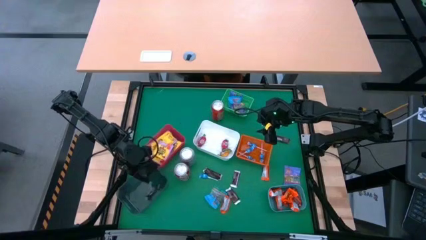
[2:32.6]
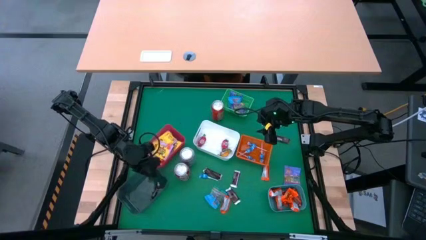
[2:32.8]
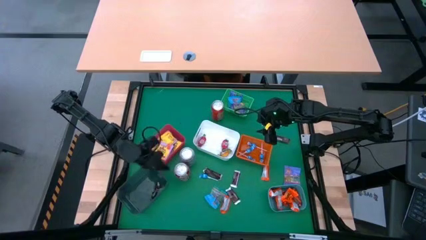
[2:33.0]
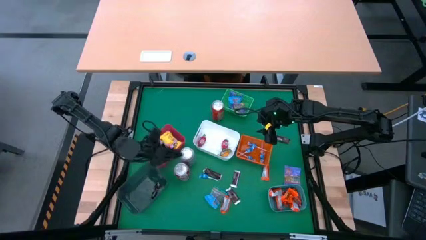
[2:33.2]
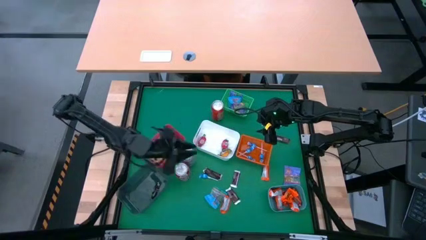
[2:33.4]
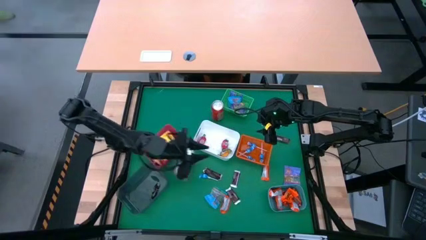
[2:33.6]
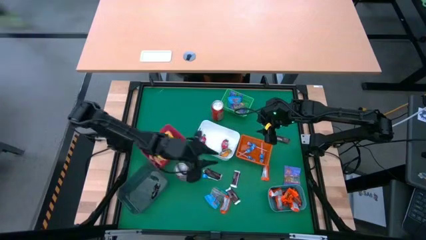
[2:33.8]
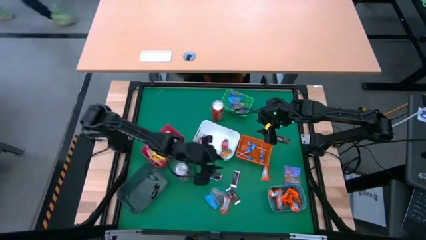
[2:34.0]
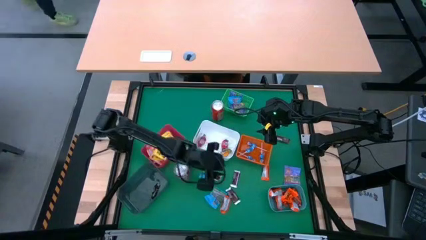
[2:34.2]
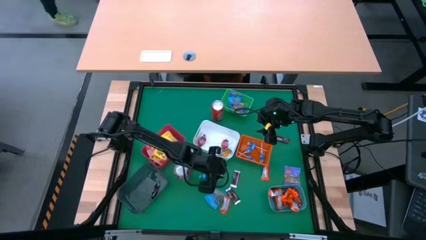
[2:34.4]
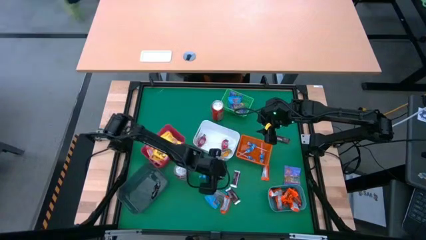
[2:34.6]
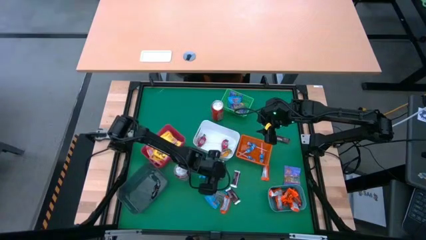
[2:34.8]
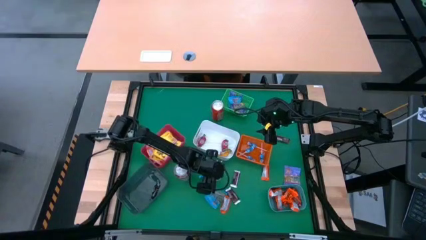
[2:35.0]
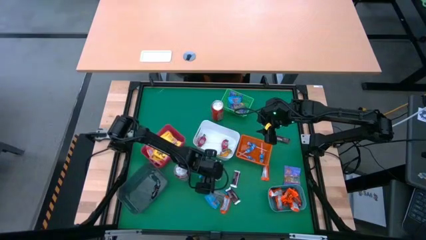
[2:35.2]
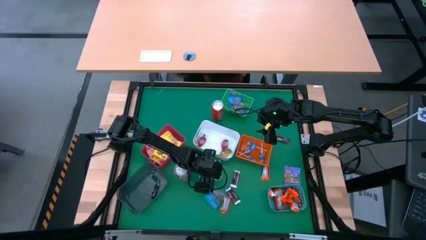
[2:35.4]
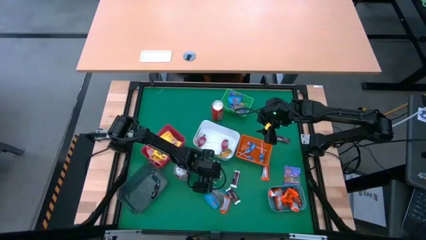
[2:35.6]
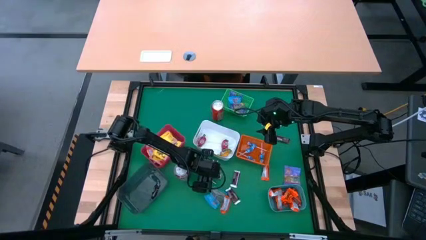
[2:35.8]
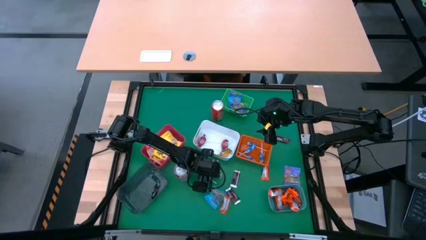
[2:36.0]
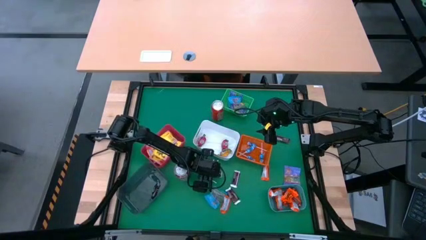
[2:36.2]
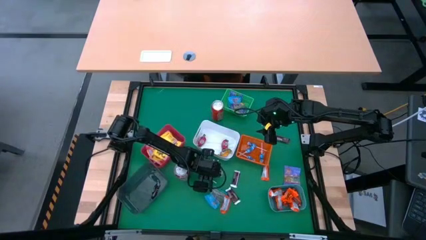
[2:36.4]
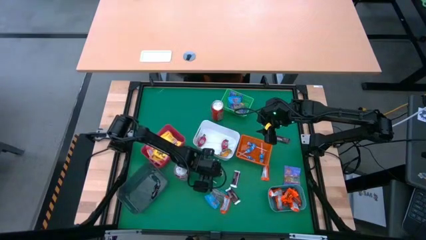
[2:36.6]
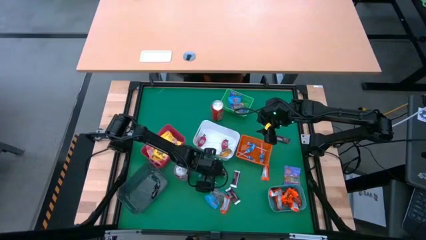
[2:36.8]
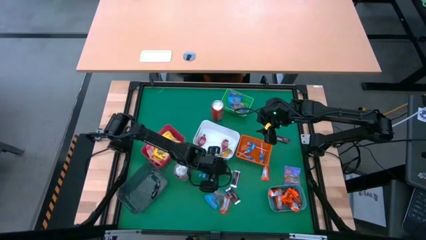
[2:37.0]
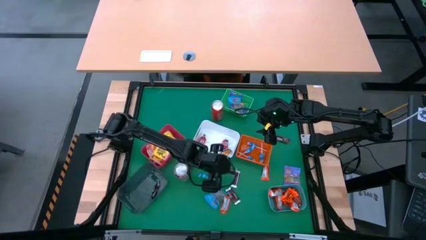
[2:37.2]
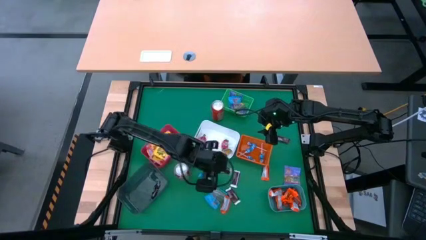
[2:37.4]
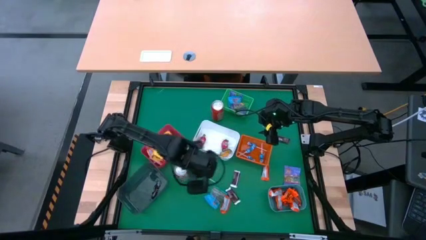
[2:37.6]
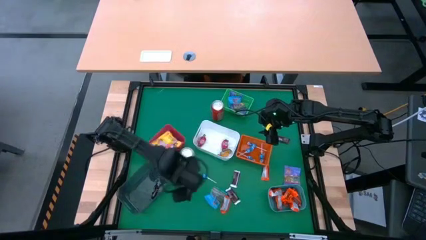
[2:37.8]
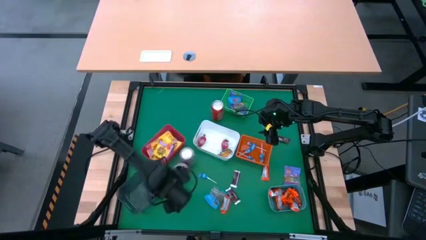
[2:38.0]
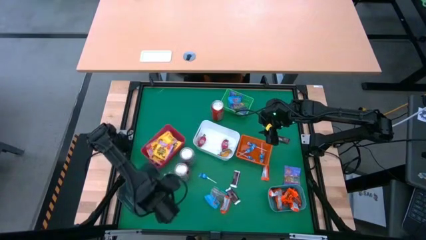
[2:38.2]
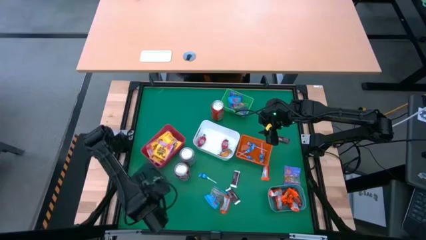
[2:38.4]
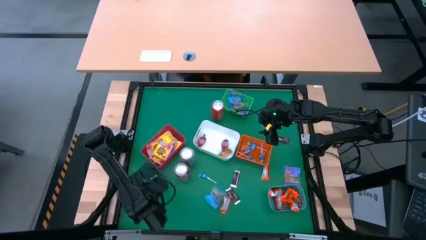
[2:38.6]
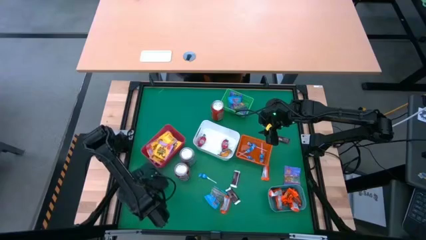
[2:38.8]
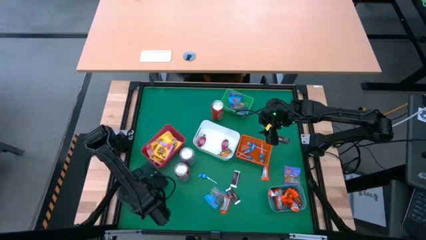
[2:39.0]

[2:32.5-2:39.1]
Task: Sort candy
Put the brown chocolate bar into the black bin

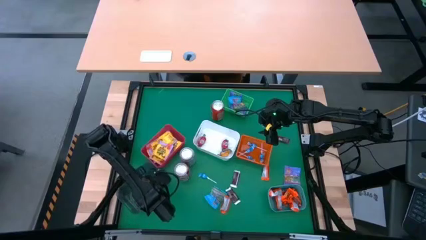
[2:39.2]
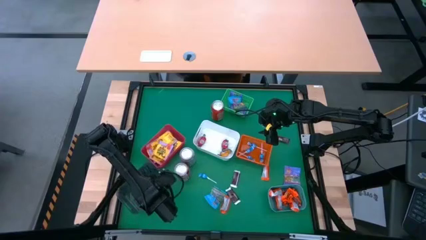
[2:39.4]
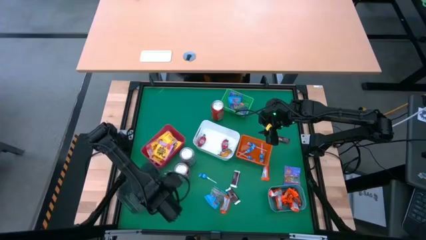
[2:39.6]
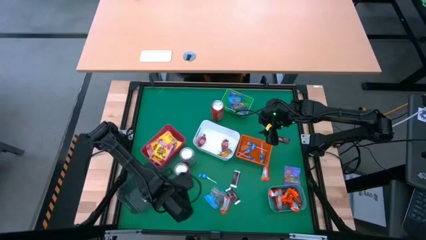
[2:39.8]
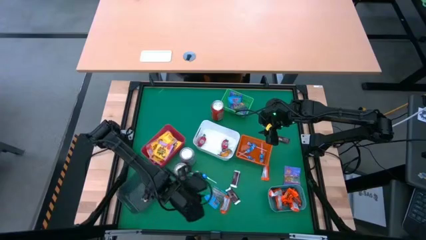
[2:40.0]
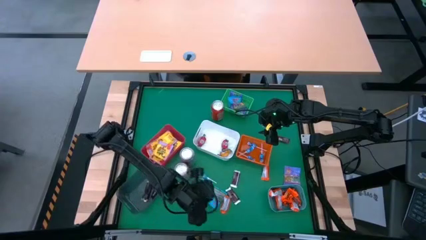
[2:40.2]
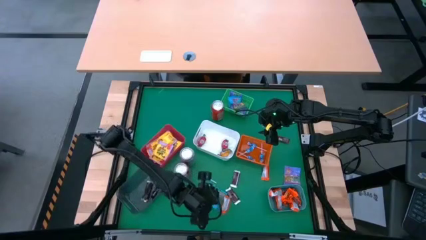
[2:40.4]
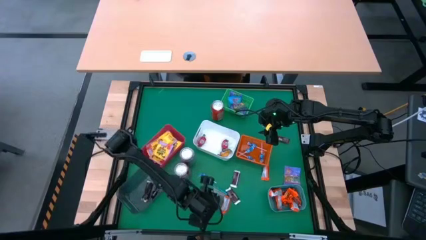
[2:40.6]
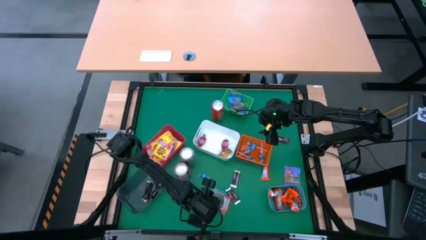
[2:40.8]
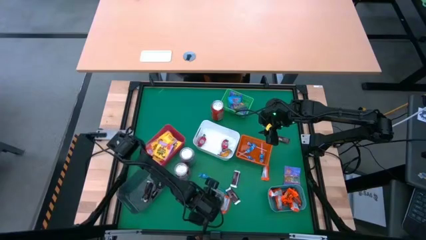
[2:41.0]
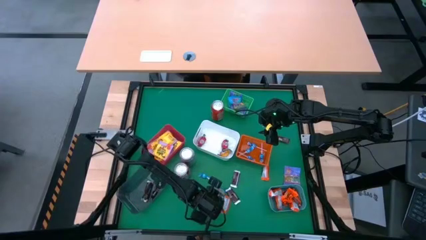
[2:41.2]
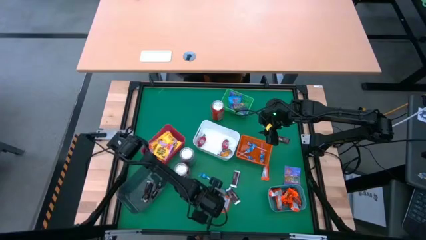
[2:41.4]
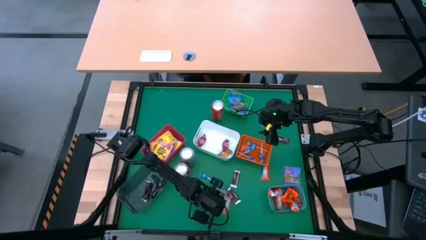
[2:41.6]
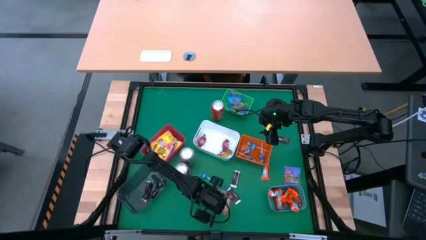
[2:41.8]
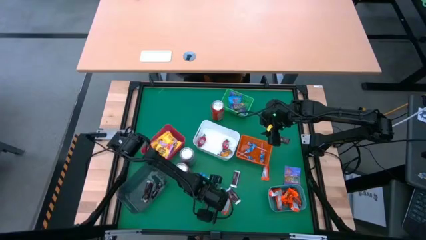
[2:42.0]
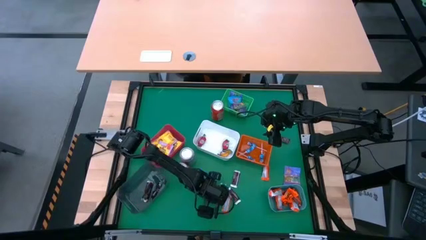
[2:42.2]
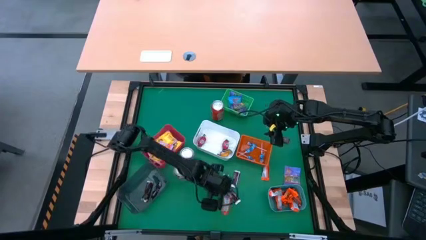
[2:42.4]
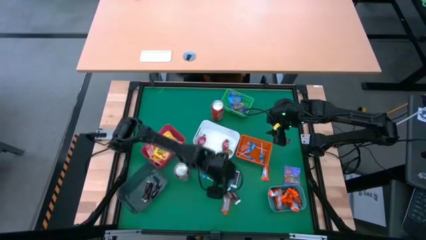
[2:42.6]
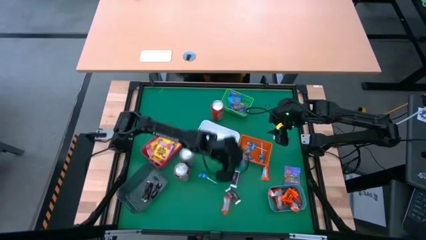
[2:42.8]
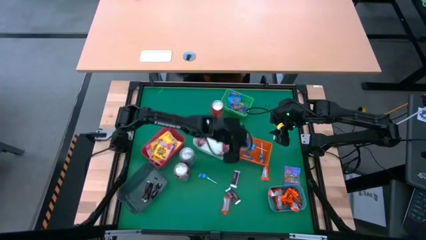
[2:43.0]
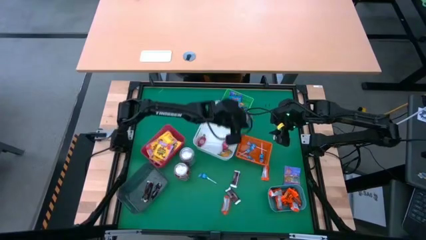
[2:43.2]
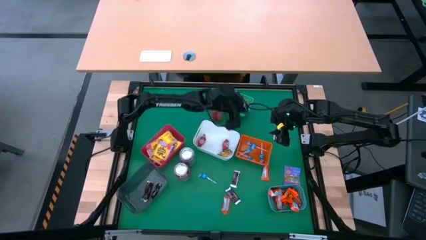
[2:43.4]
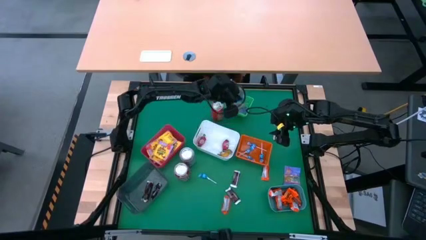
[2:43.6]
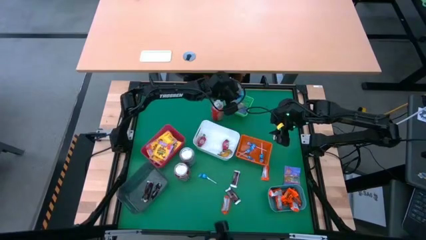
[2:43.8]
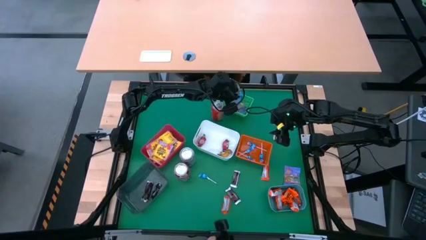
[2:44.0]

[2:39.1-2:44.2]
Put the blue candy into the green bin

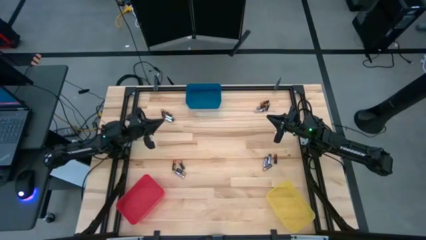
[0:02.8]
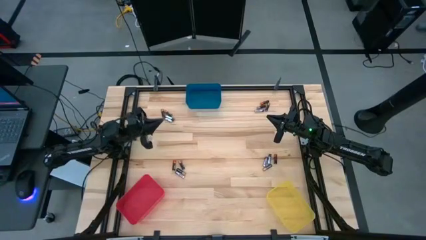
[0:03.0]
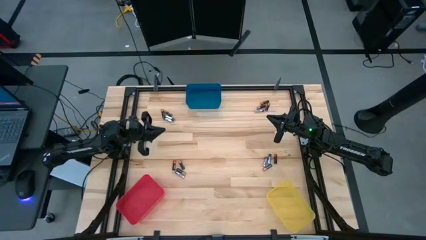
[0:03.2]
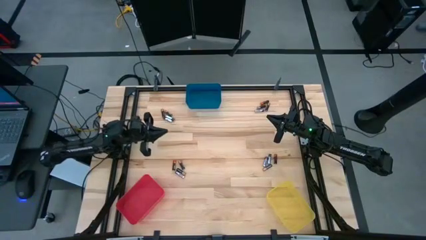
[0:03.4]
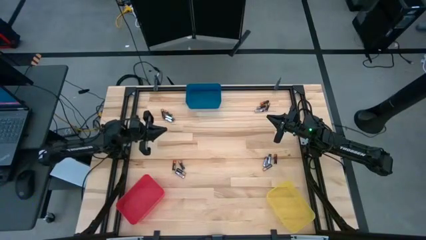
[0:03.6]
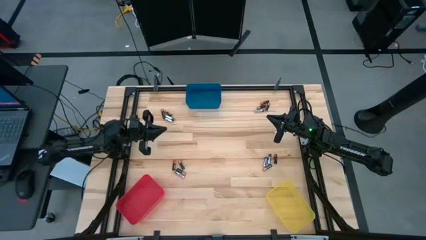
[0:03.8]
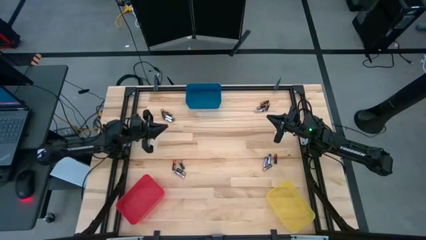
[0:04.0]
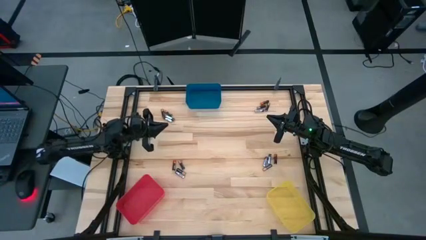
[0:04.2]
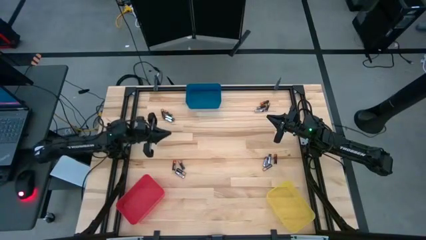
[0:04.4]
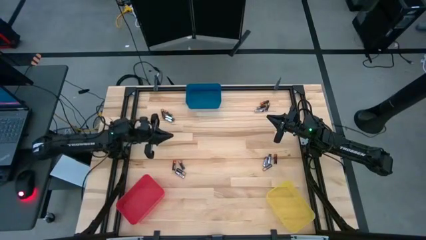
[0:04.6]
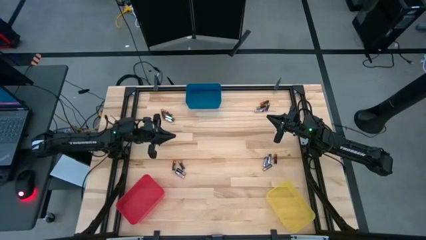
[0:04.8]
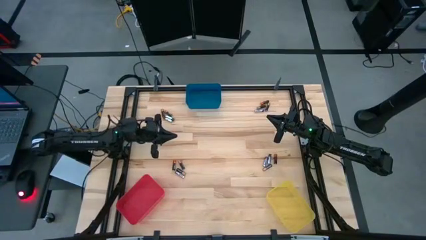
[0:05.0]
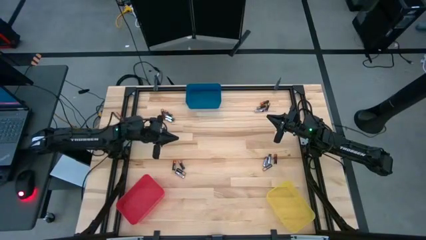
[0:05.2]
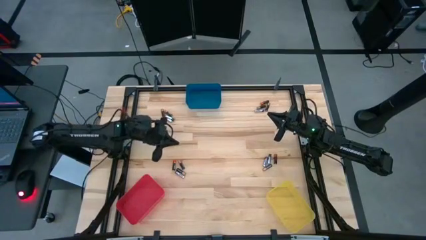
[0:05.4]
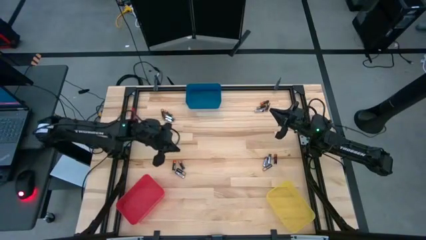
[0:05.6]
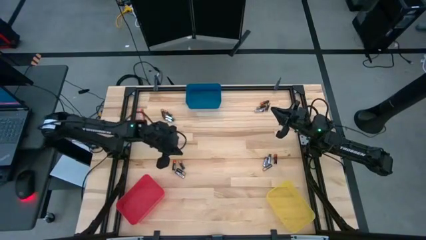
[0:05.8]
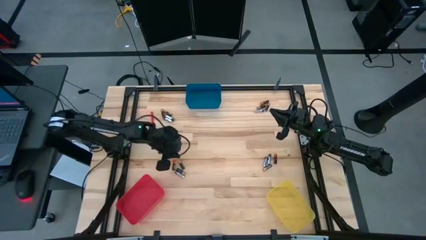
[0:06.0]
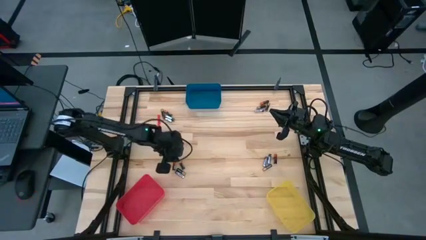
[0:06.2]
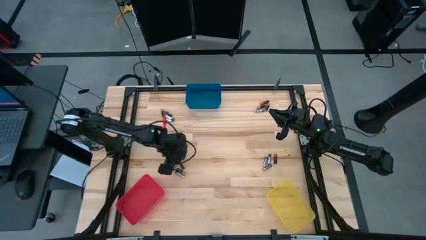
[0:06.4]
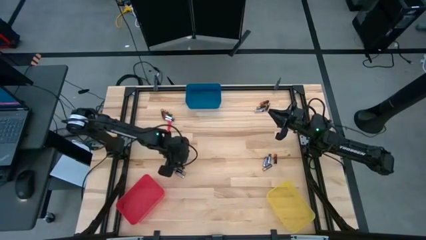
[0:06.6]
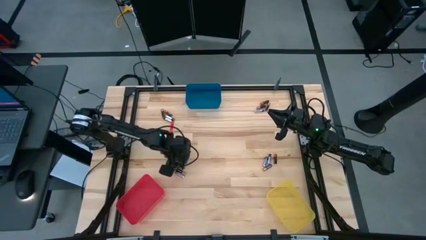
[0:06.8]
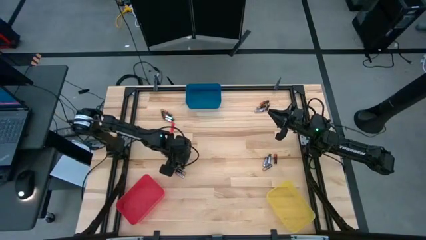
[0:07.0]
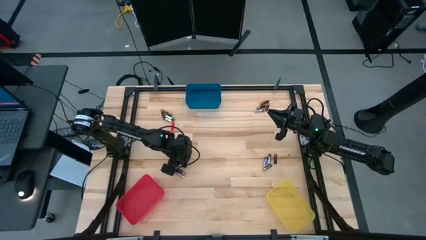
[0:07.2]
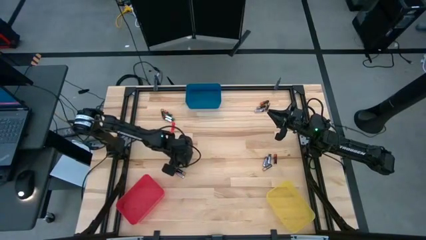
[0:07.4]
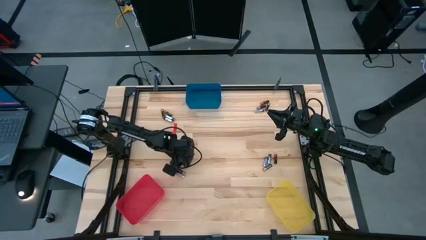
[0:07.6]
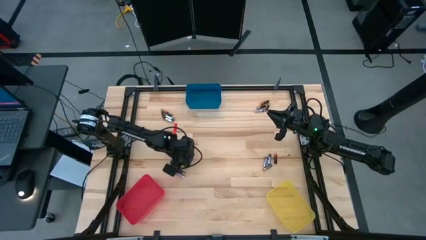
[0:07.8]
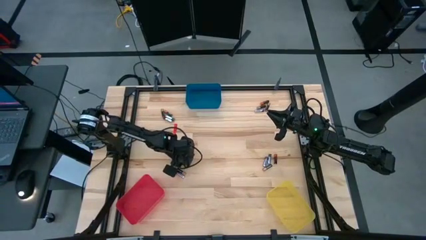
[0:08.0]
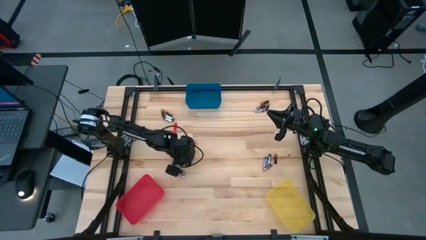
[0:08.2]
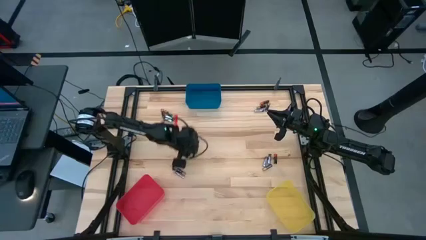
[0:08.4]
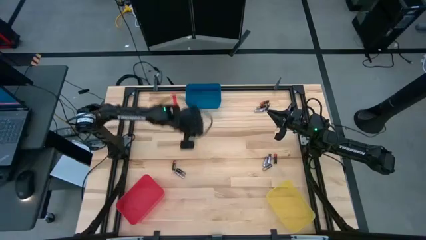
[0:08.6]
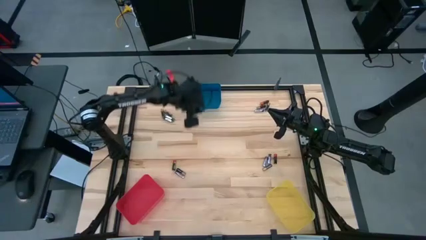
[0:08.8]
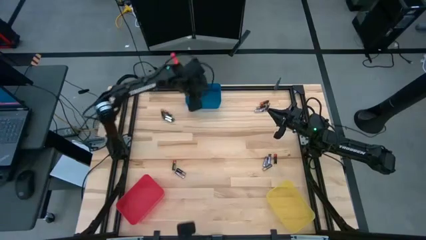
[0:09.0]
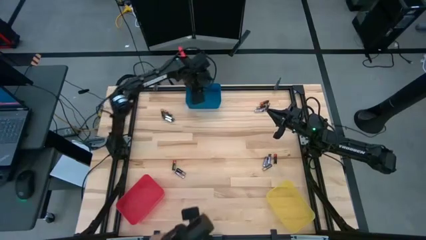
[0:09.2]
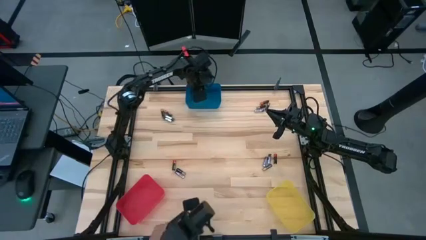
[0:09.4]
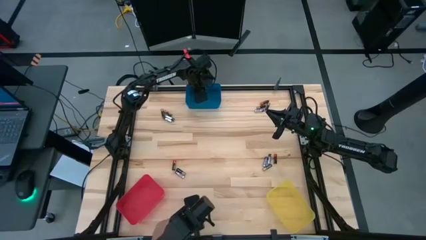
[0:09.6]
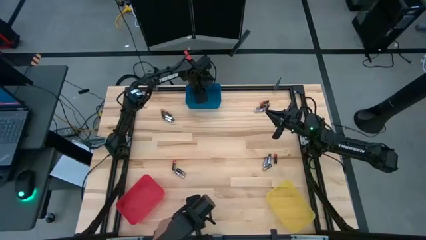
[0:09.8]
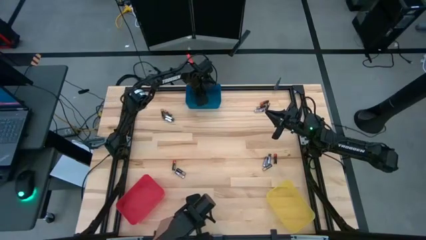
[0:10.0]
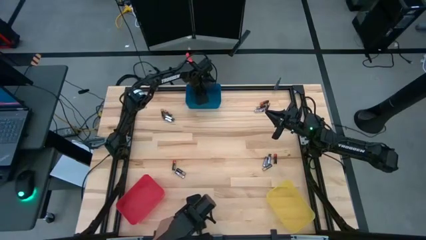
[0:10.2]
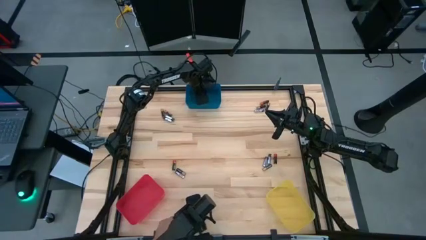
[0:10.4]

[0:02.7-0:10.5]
Task: Sort batteries
Put the black-brown battery into the blue bin
